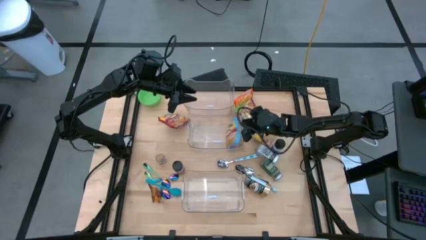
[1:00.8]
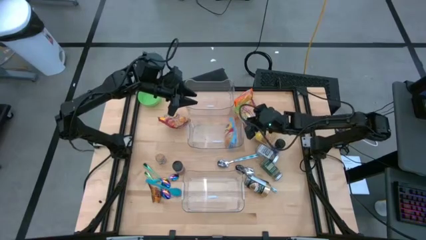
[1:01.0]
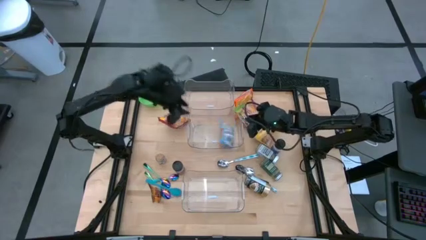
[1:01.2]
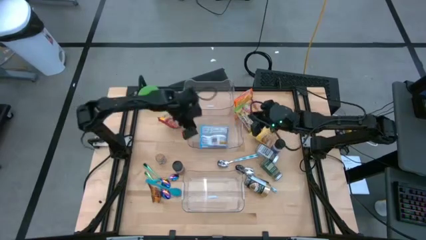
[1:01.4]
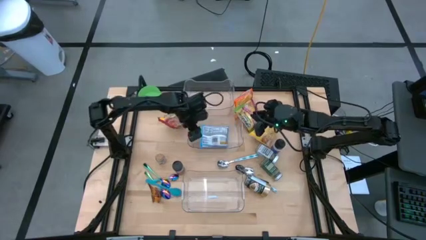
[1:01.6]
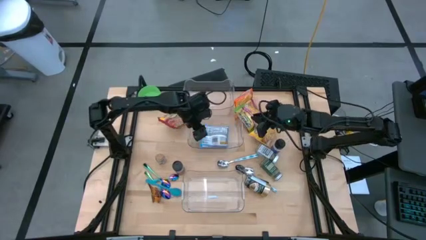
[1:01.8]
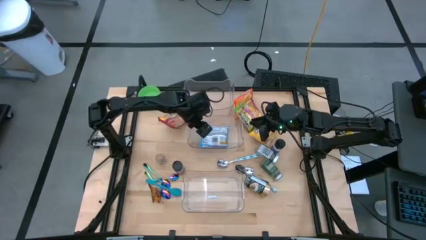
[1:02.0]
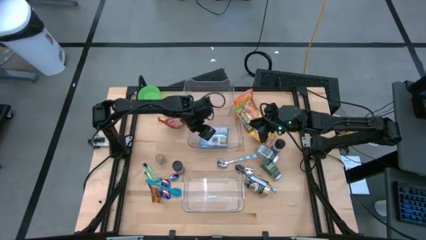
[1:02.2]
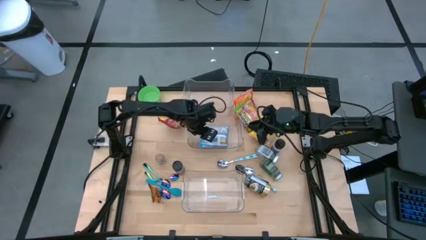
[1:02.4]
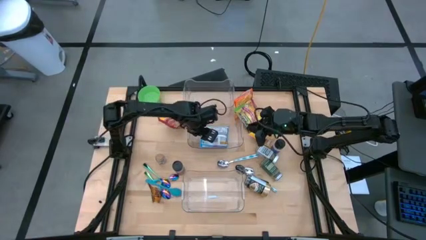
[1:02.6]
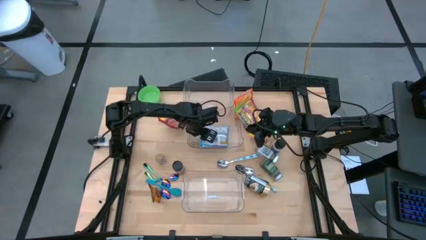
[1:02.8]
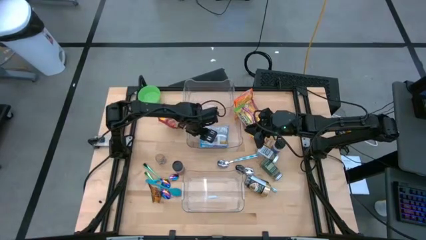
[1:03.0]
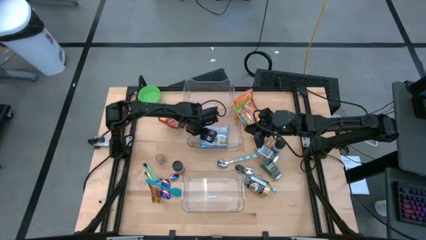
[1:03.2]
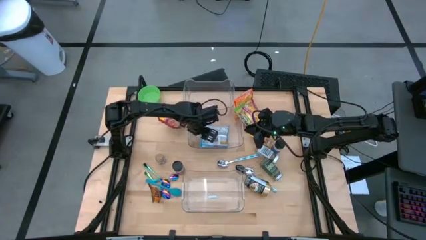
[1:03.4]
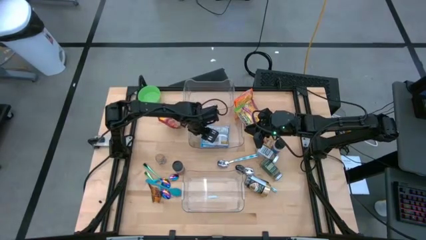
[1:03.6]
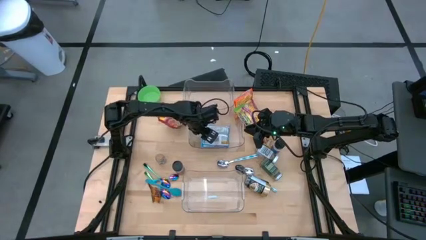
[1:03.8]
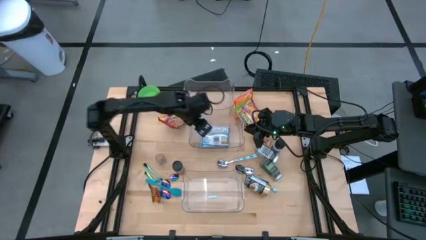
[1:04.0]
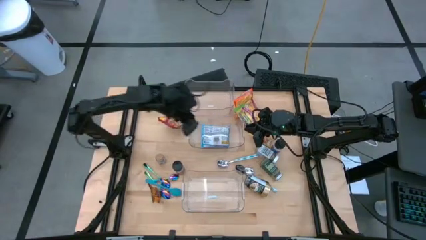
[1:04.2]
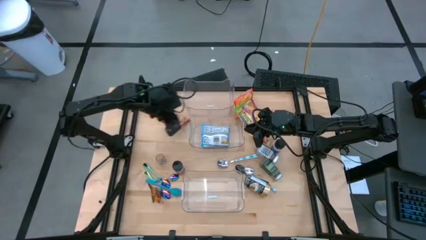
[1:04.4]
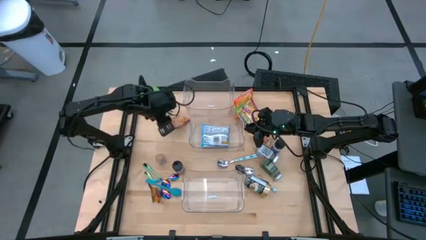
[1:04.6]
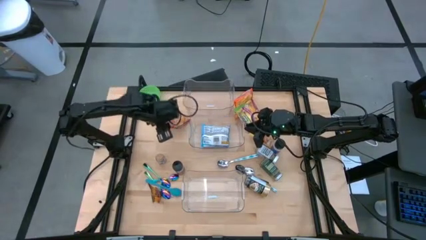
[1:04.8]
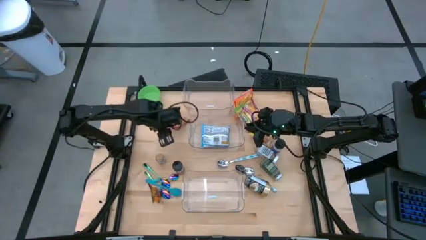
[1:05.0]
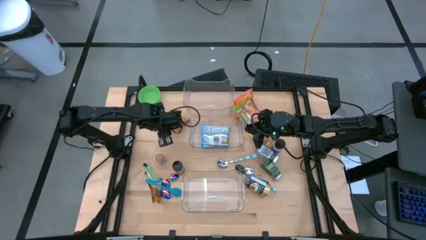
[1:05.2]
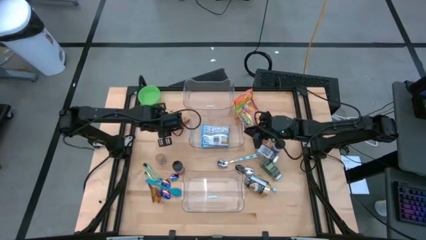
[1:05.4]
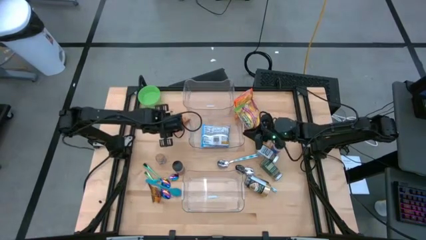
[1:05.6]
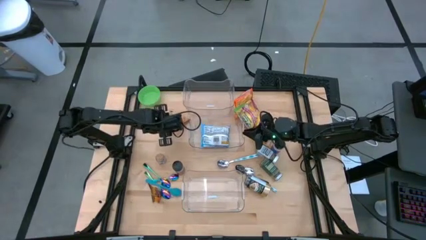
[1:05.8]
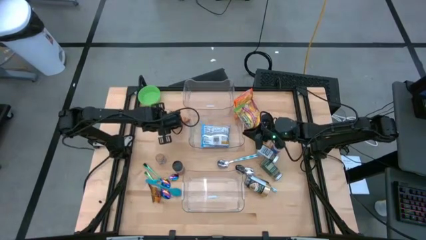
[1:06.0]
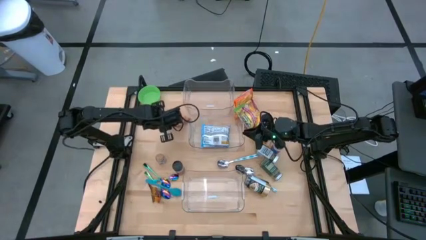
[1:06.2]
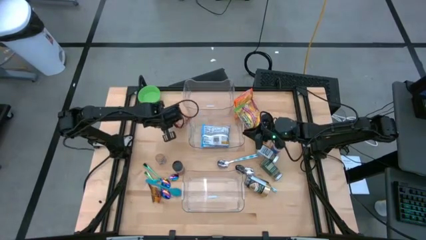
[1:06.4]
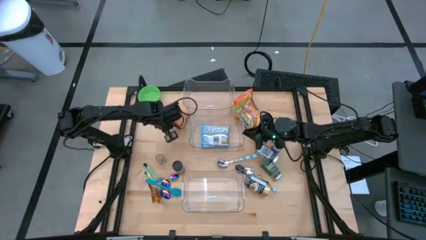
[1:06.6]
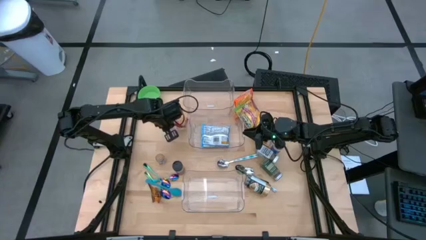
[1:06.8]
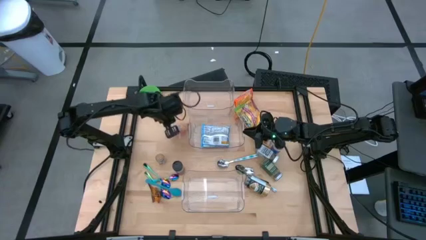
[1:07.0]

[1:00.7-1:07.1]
Task: Pick & Place Food Item
Put the red noodle pack into the middle transparent bin

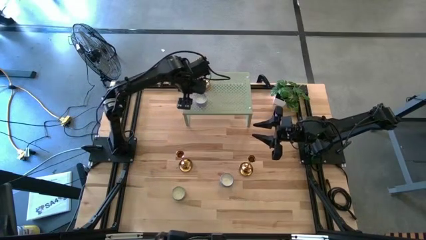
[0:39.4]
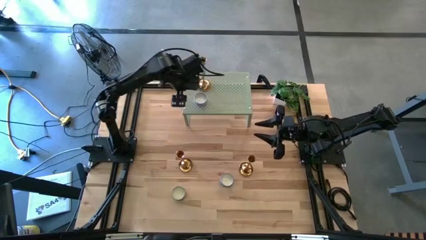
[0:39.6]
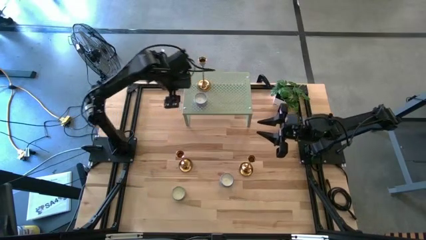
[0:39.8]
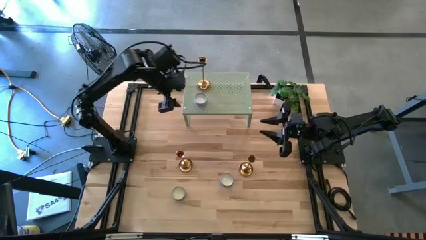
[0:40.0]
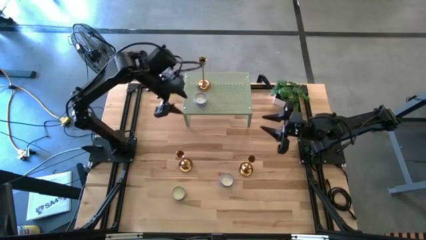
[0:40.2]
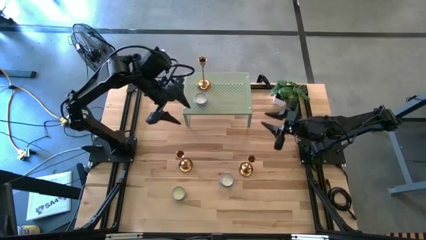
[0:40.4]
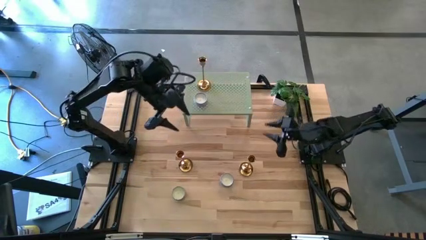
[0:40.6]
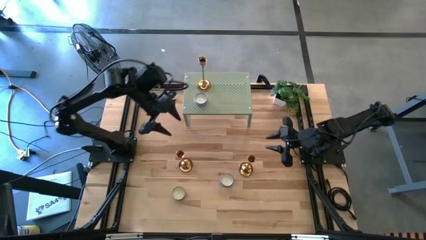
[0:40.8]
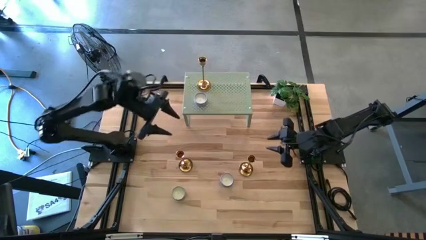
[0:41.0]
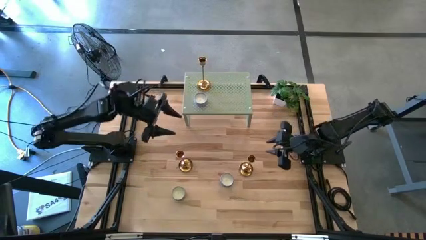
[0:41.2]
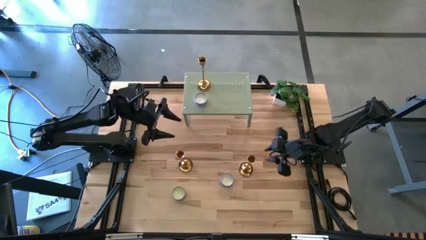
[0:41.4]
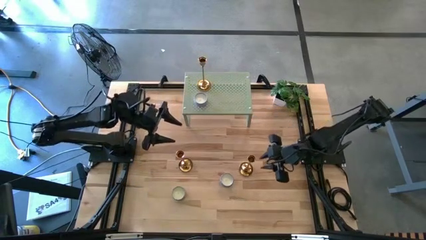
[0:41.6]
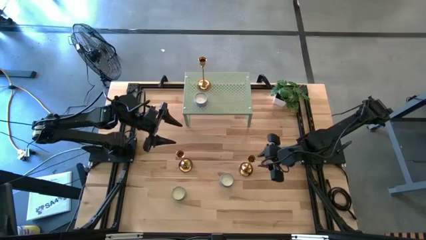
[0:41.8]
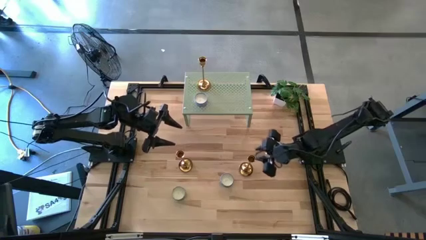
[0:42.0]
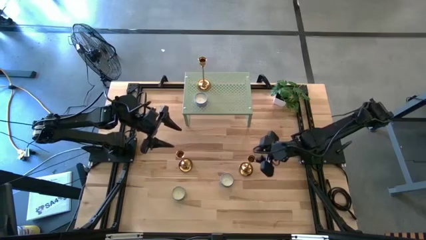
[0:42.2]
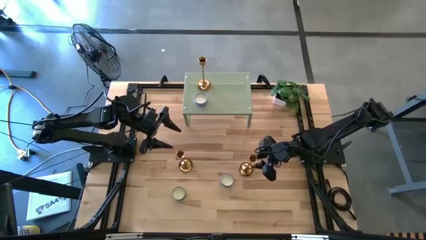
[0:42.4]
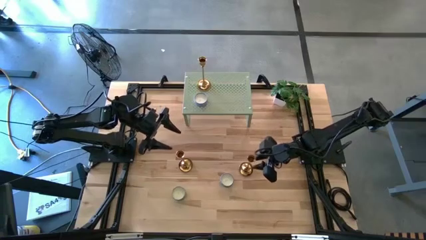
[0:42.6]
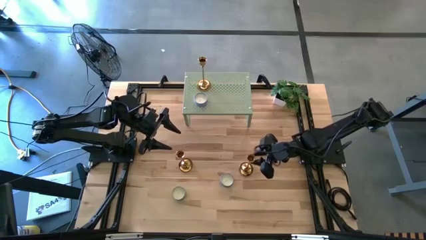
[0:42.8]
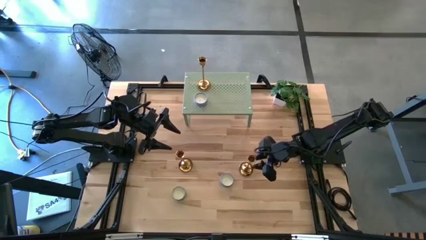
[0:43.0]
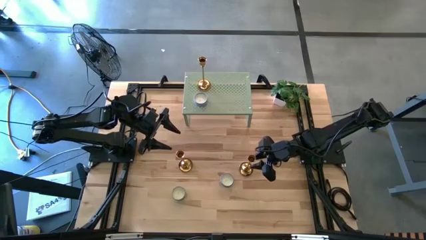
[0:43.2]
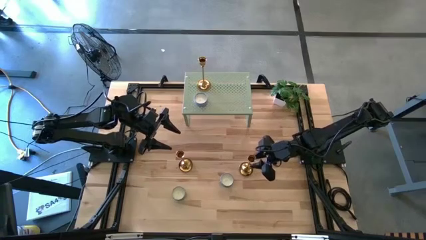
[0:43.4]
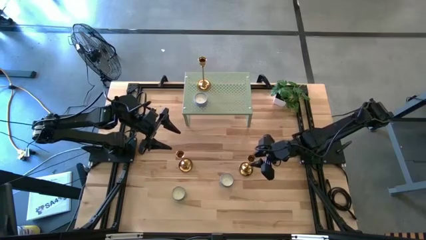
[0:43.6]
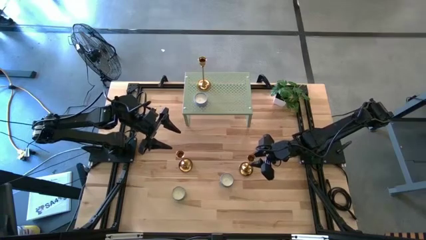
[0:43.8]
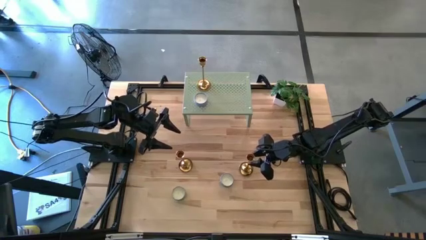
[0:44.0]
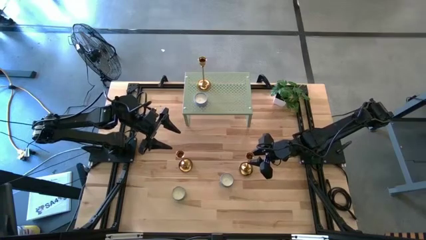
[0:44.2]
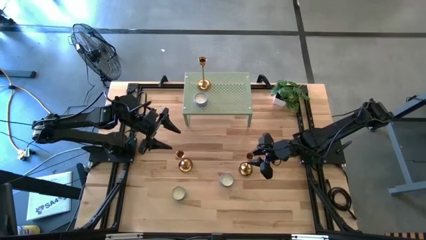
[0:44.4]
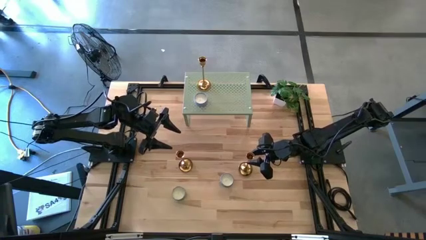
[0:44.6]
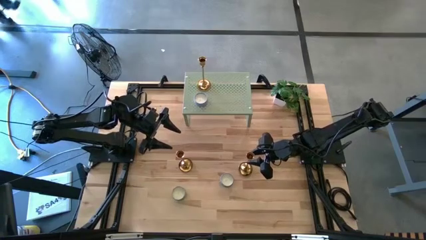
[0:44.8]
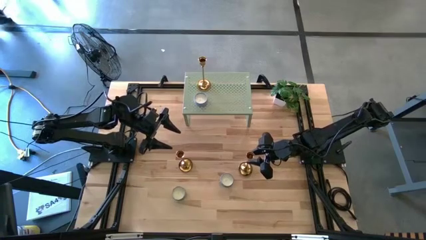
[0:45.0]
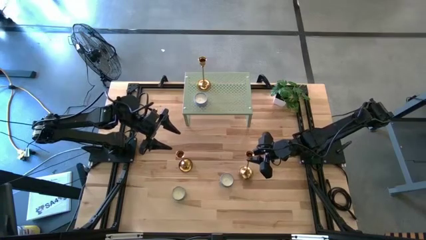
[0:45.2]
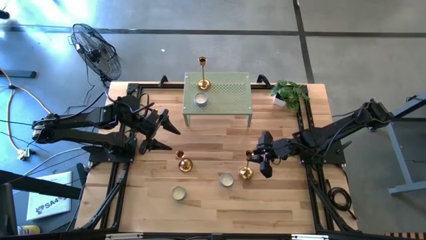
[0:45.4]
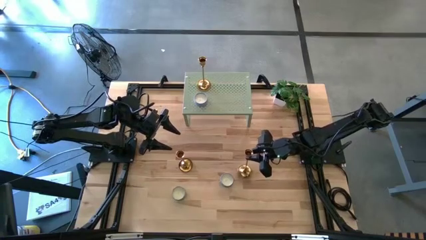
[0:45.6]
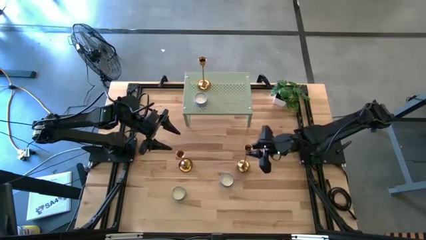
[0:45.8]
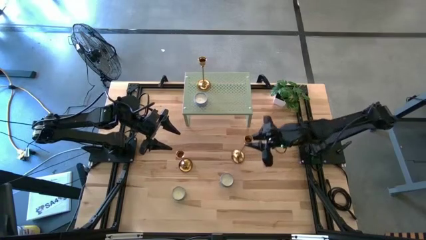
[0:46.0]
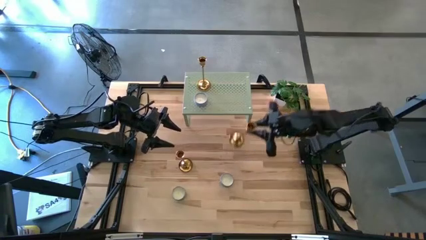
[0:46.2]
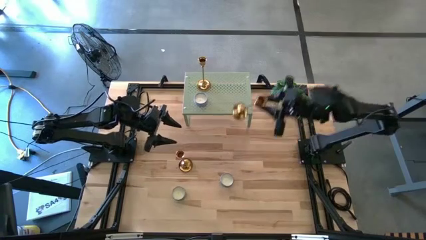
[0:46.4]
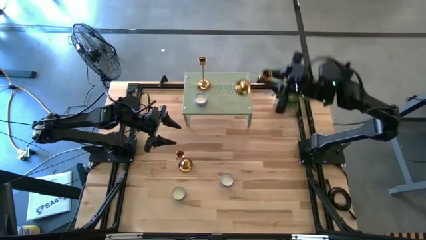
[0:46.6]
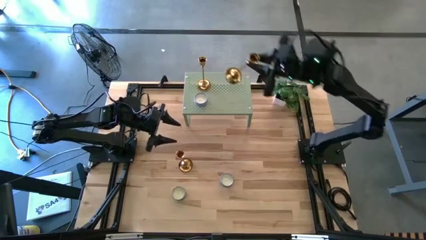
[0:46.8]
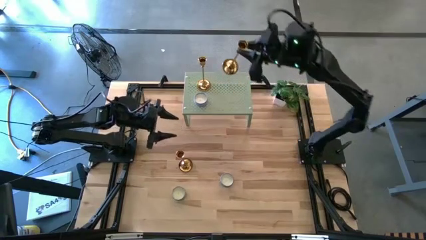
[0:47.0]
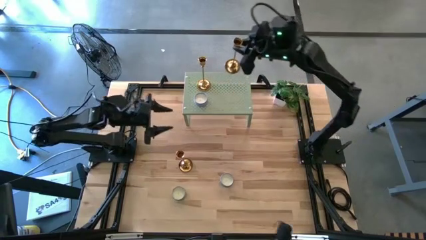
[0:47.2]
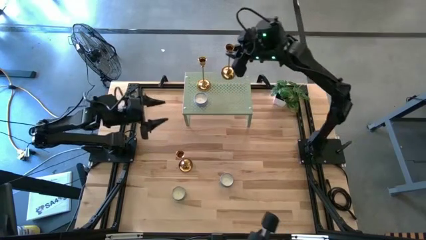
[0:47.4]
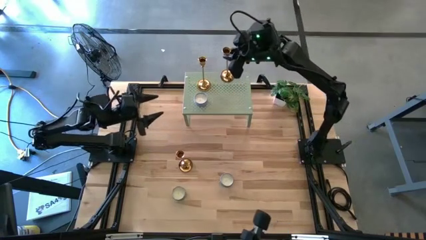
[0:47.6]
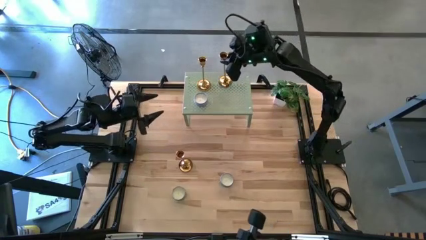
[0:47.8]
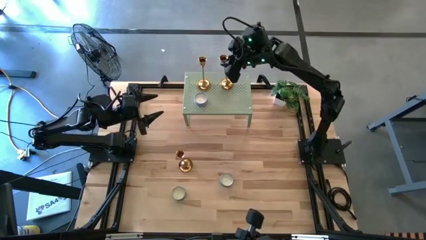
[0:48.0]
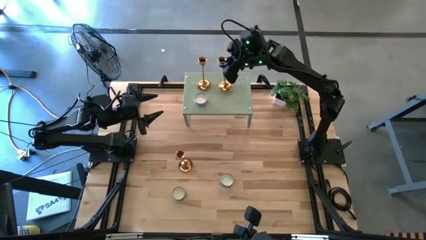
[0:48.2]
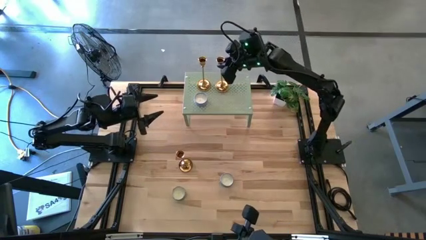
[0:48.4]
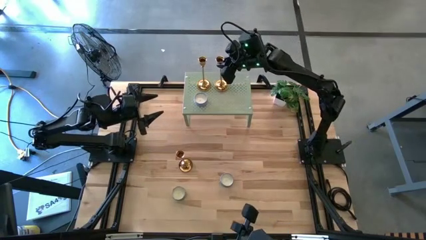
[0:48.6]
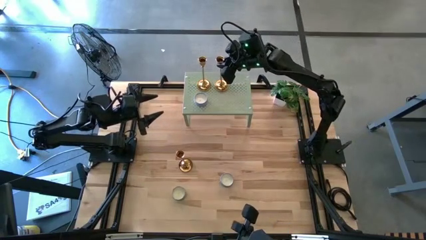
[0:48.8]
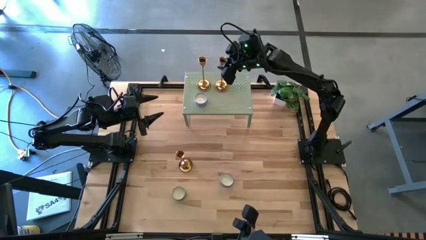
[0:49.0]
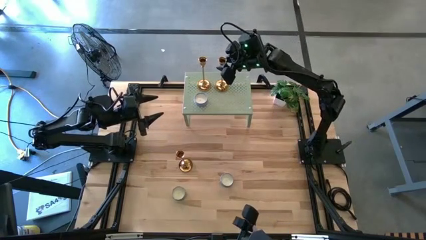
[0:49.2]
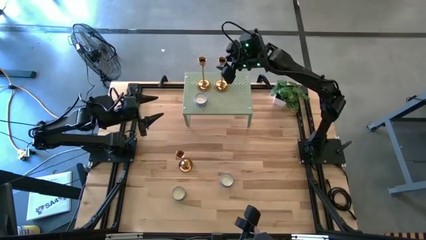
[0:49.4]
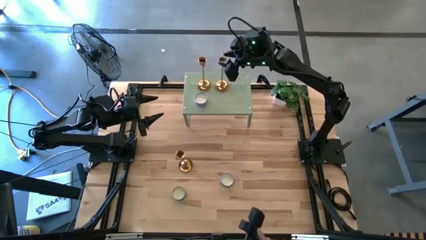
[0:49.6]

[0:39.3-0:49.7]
Task: Pick & Place candle stick holders
Put the right gold candle holder on the shelf
